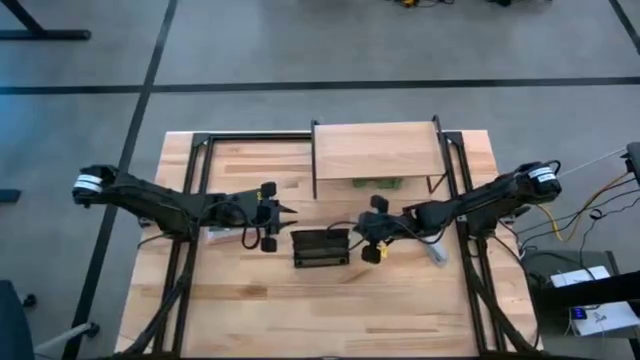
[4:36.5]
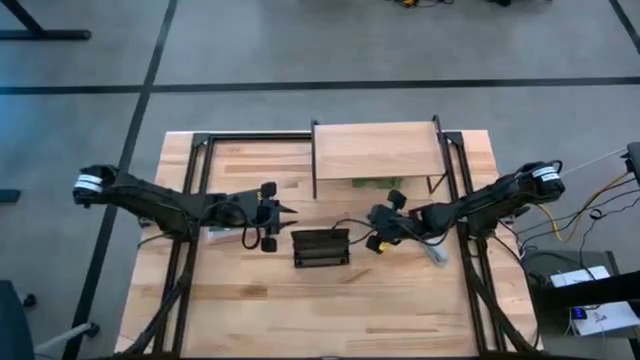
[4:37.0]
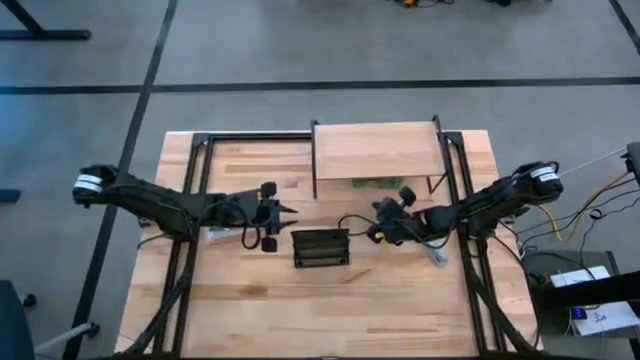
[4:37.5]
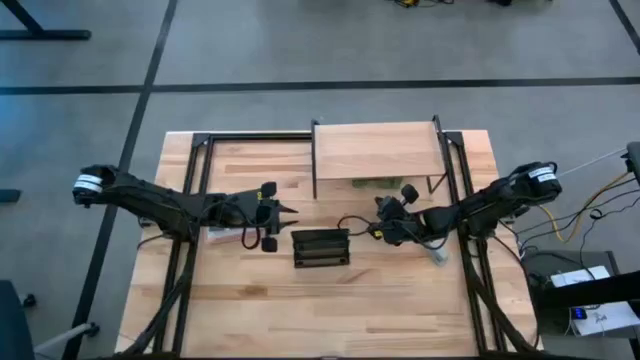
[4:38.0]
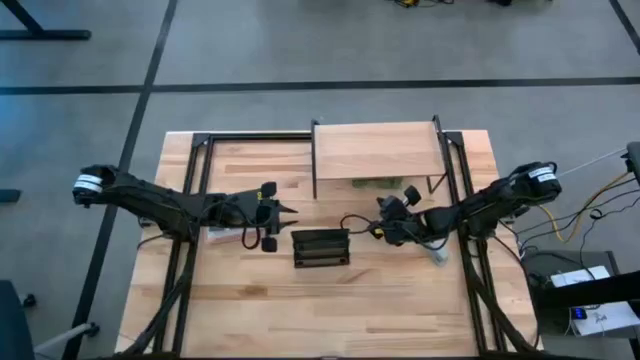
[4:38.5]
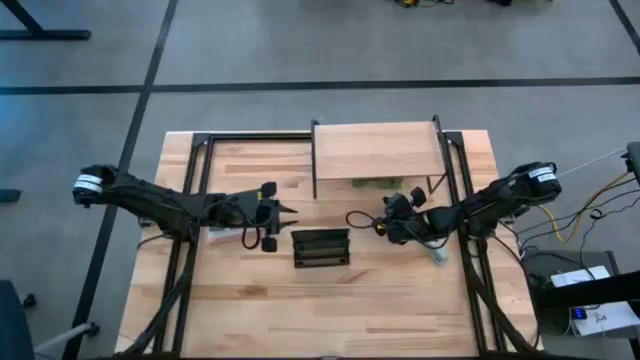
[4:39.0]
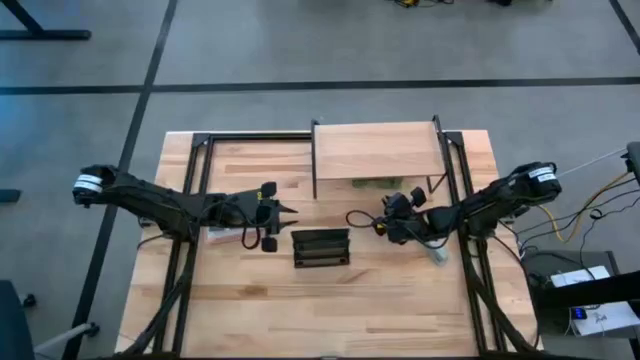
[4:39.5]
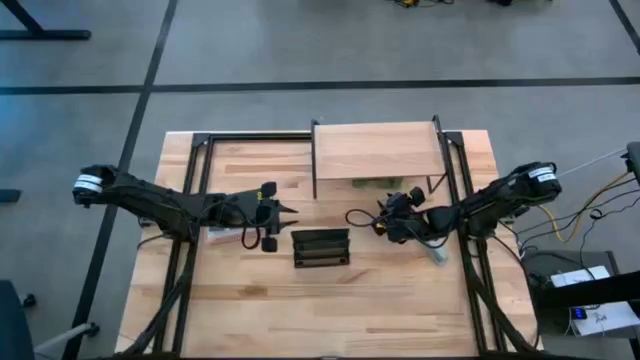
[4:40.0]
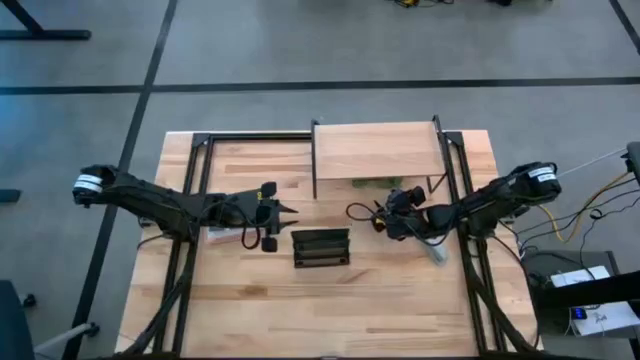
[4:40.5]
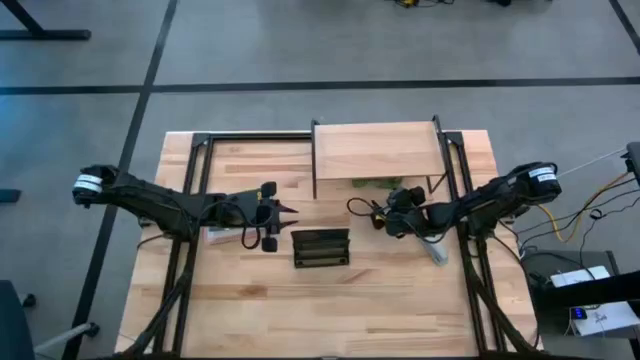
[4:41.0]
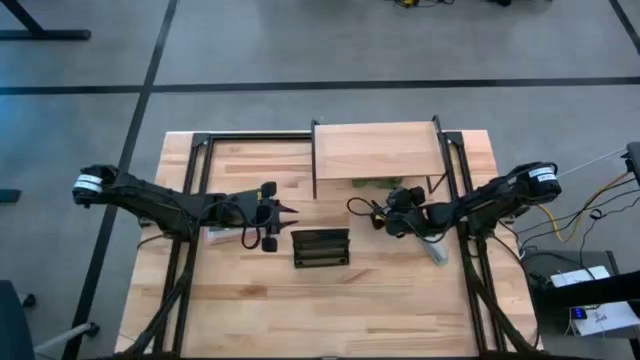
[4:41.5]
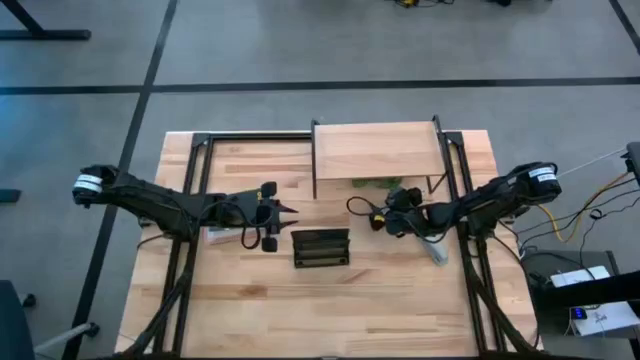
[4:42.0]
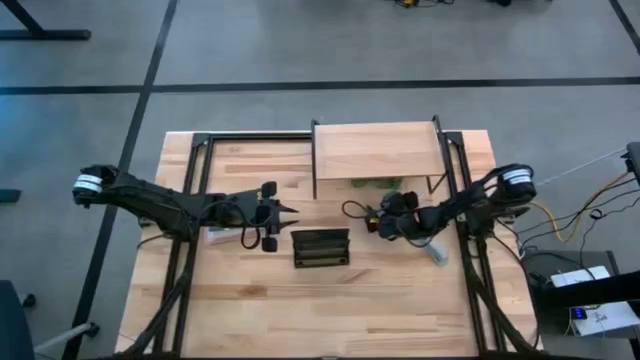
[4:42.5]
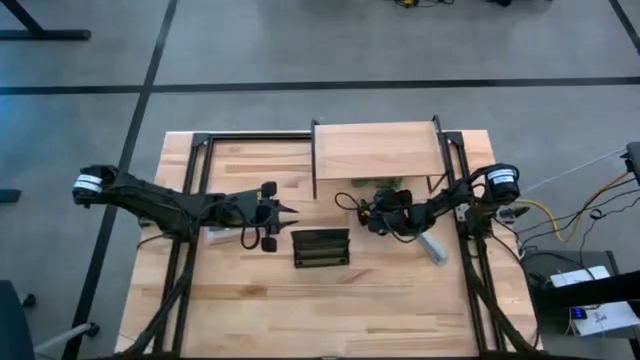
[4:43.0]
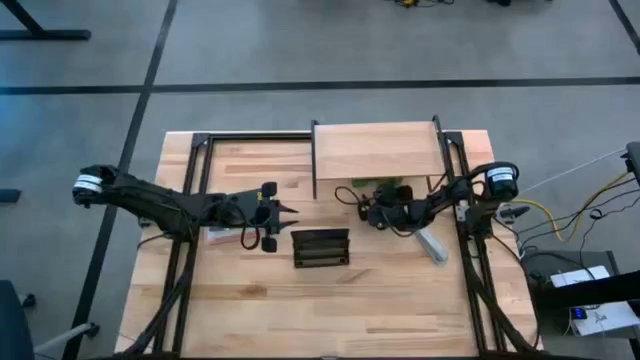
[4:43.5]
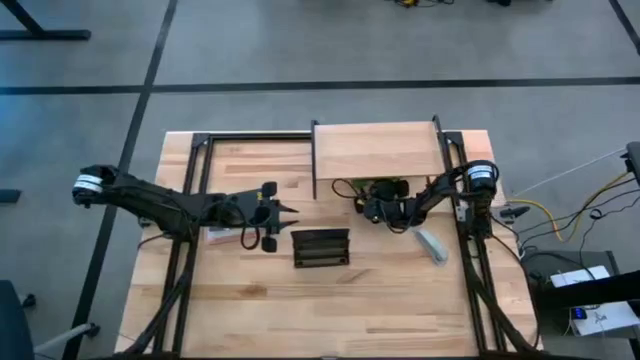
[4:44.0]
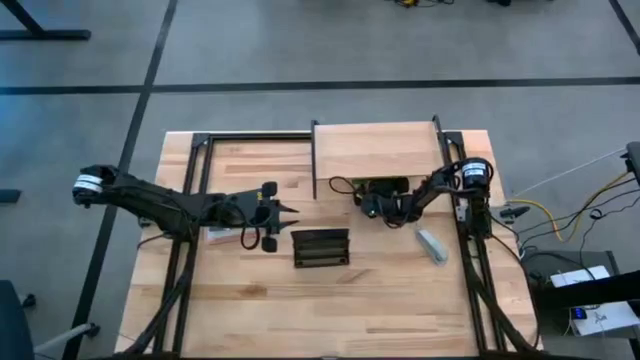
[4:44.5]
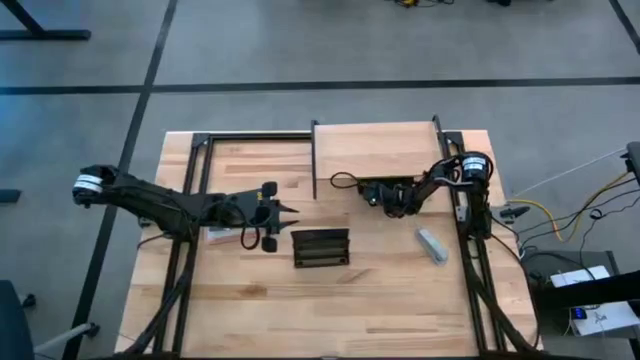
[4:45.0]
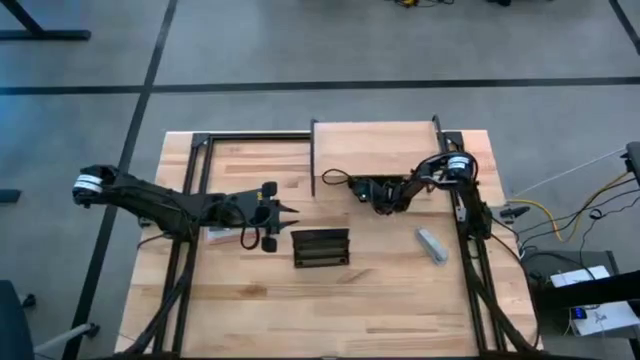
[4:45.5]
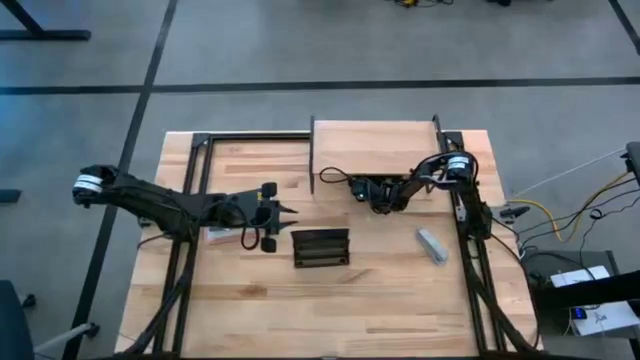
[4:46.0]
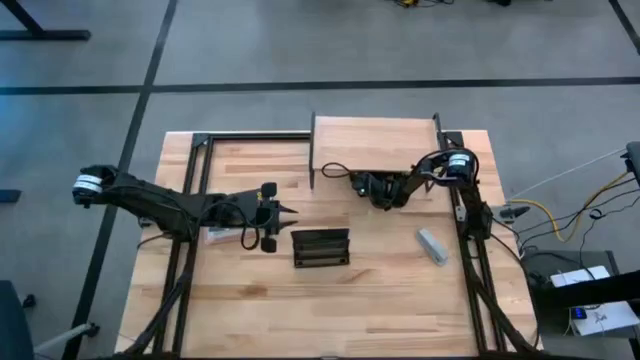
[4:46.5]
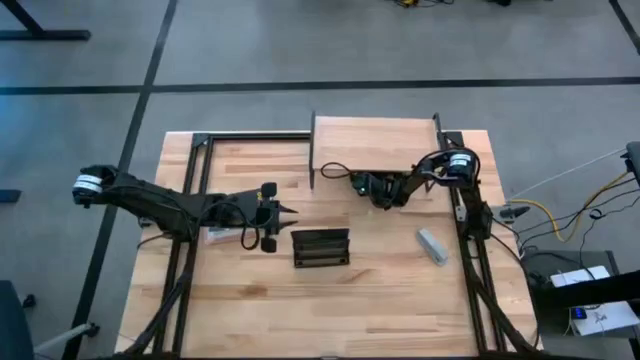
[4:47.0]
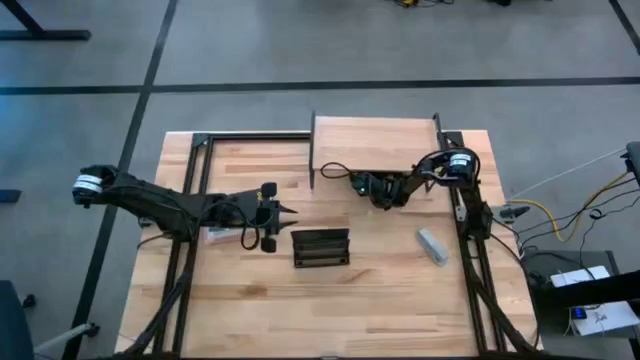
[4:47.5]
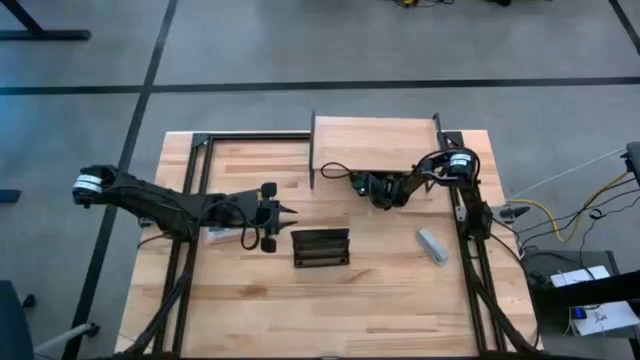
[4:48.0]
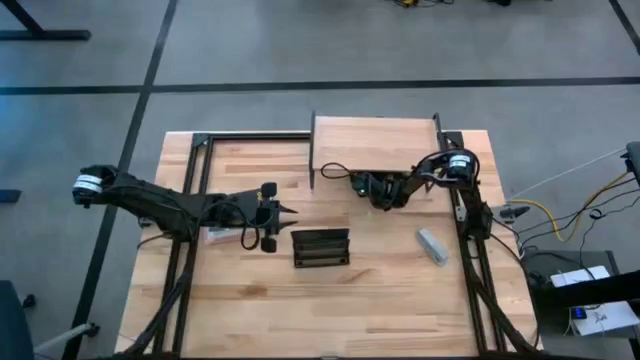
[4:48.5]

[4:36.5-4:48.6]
Task: Stock shelves
Move the white vase plant to the middle right of the table

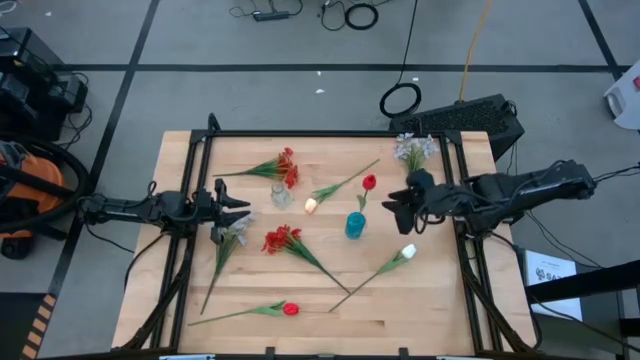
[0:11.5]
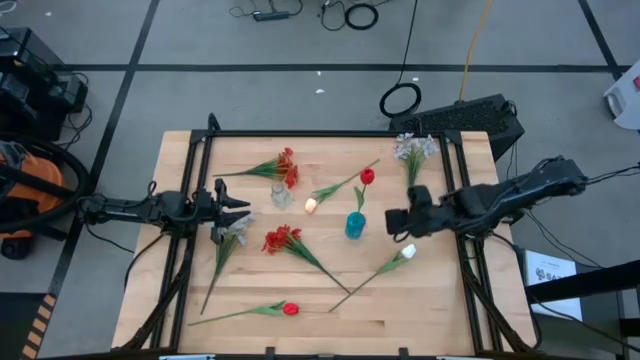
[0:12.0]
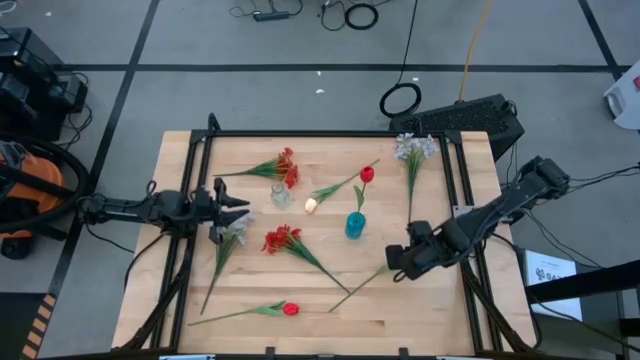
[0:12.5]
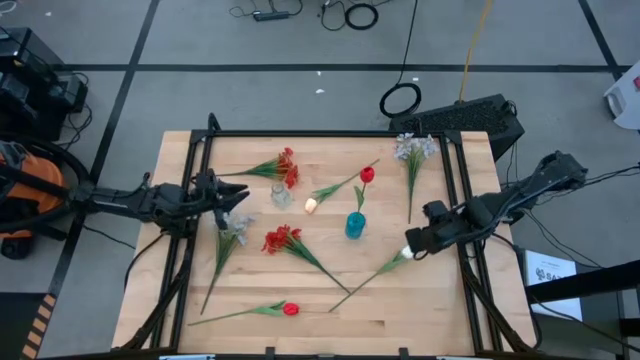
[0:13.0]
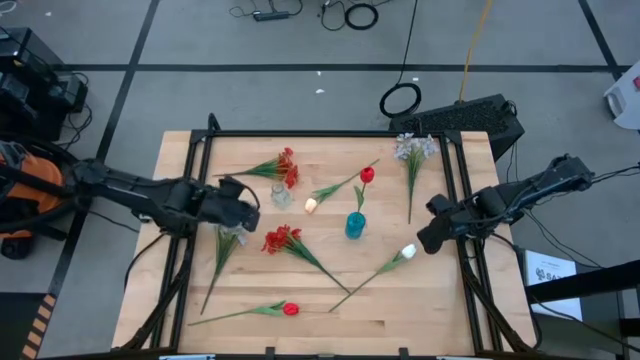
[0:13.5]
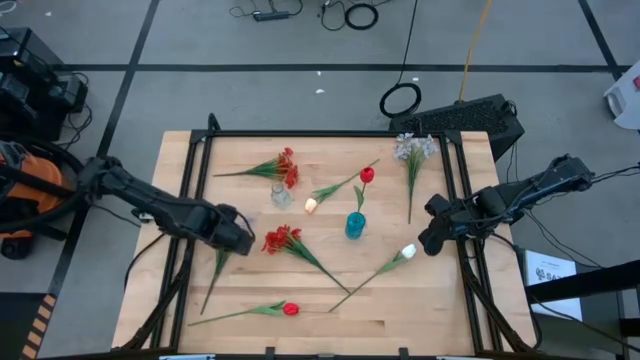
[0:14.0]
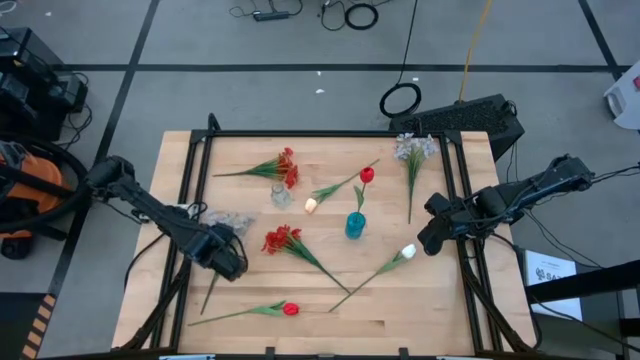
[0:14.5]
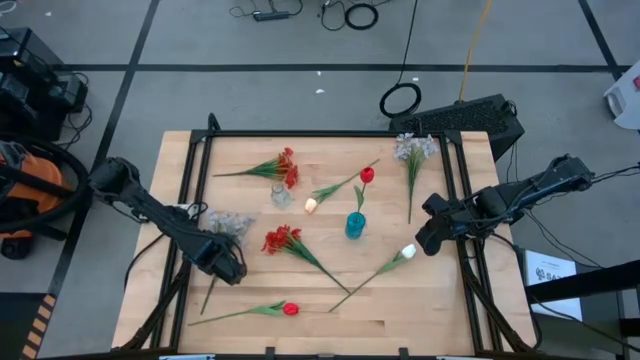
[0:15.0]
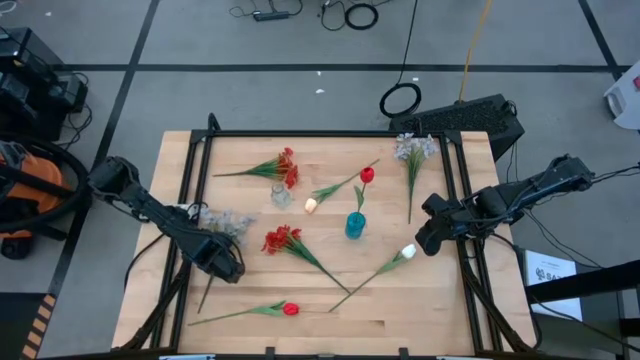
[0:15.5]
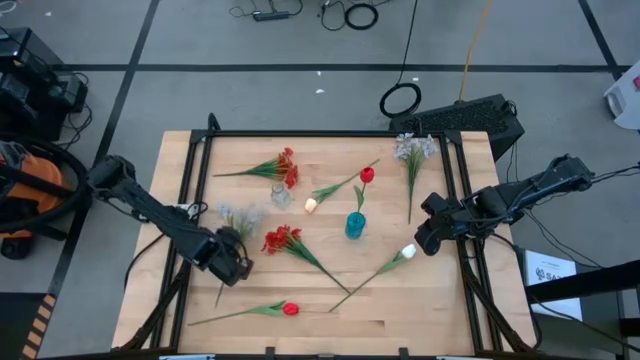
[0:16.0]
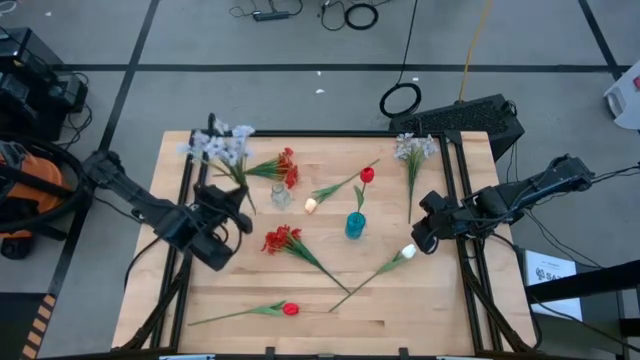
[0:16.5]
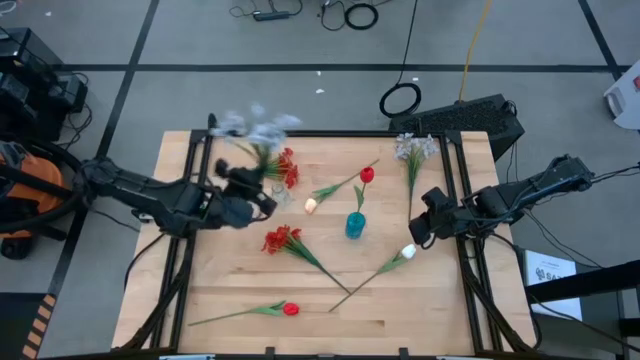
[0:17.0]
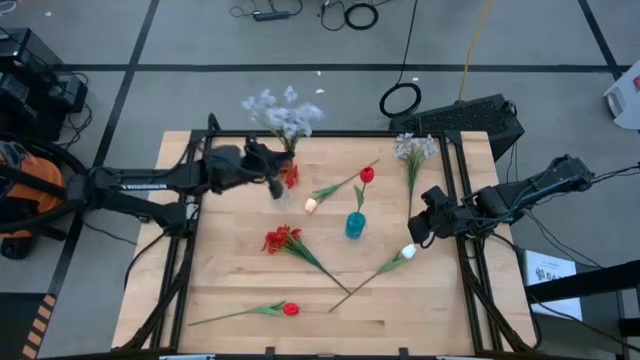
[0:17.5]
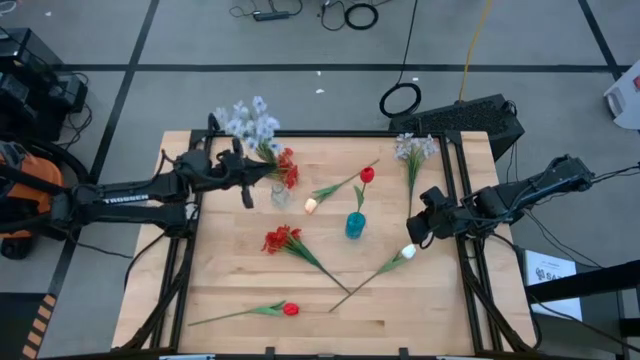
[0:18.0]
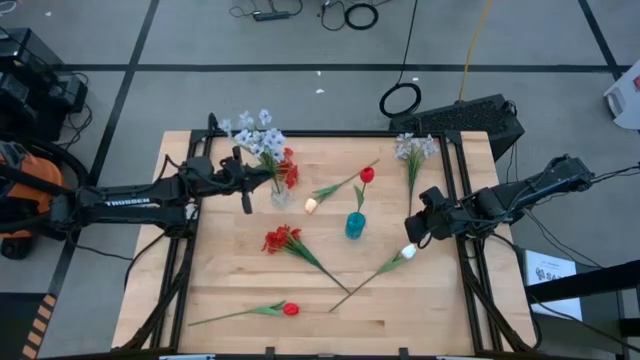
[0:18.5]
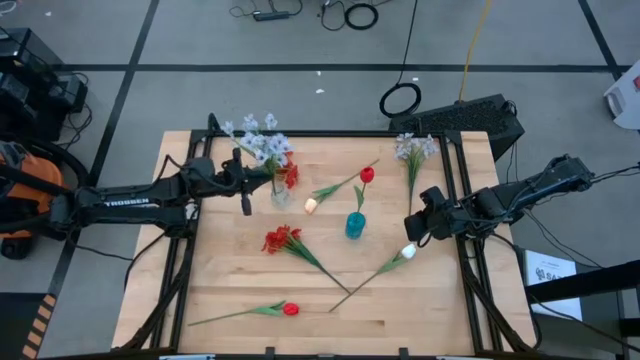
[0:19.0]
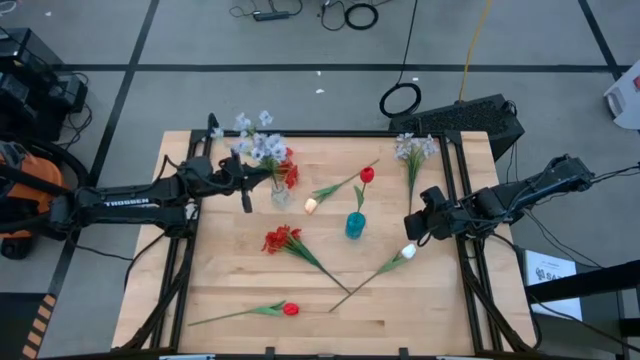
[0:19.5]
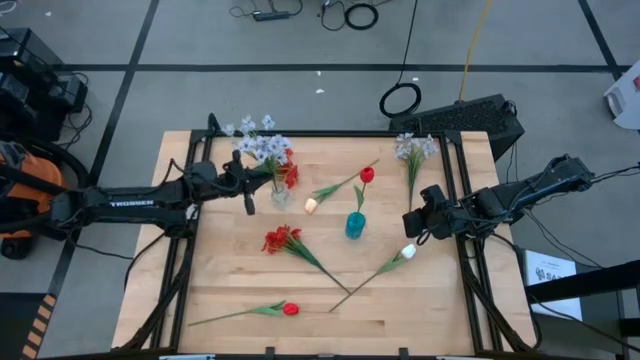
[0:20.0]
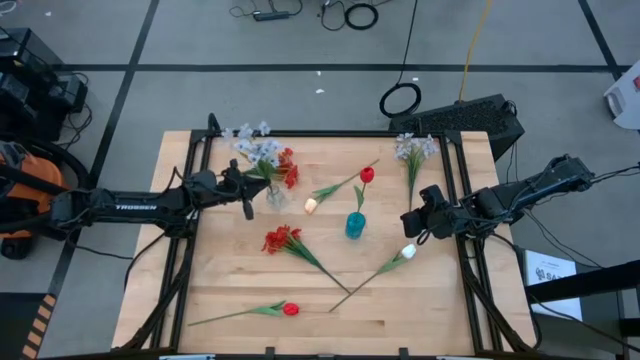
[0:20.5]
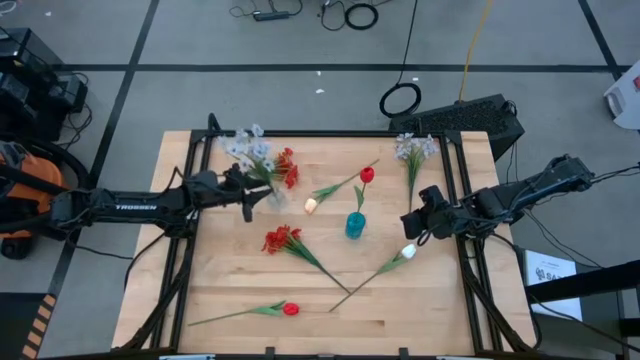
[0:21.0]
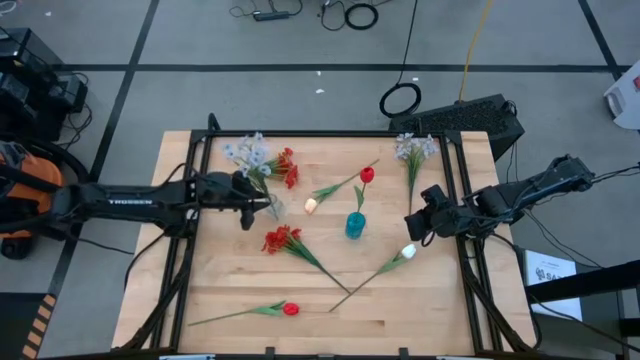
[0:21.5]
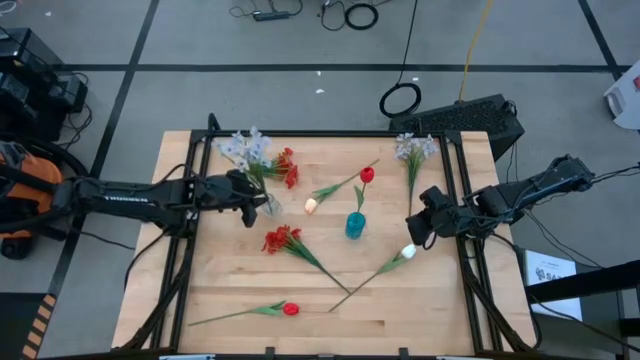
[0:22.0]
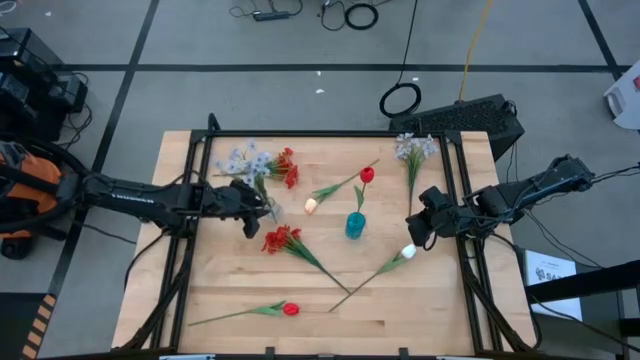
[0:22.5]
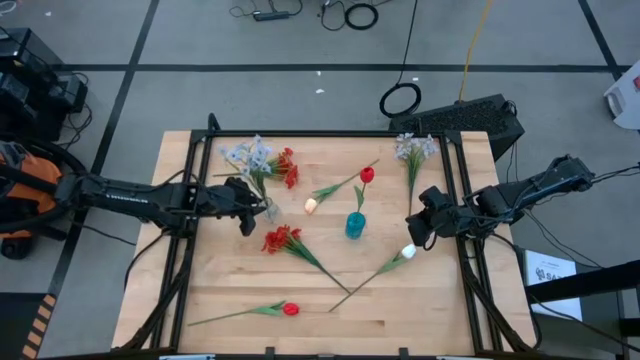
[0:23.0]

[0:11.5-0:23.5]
Task: Sort flowers into vase by color
Put the left white flowers into the transparent vase
